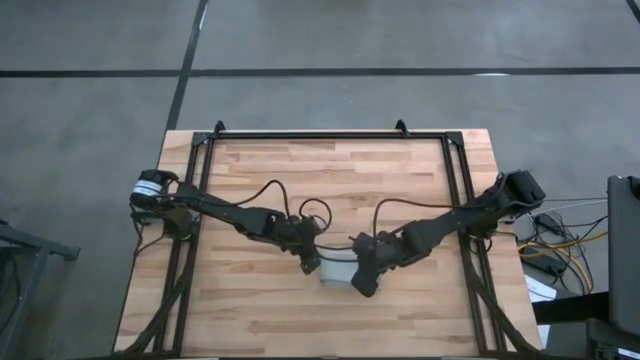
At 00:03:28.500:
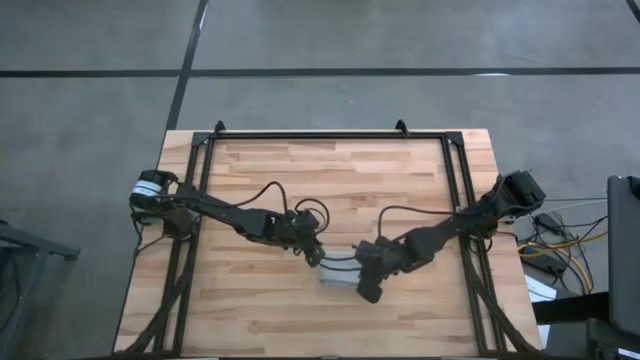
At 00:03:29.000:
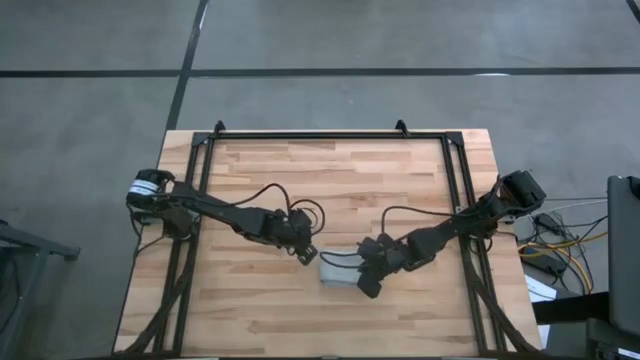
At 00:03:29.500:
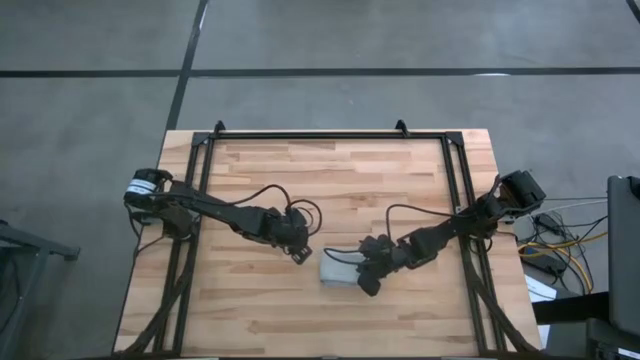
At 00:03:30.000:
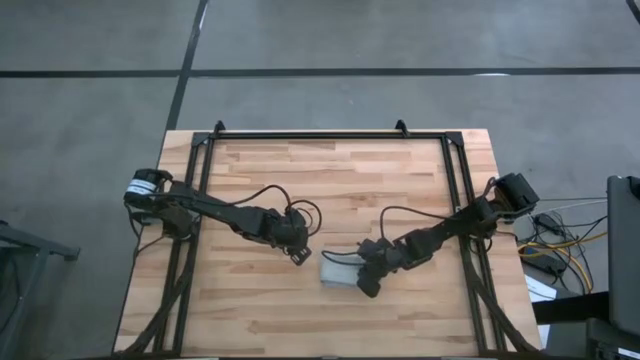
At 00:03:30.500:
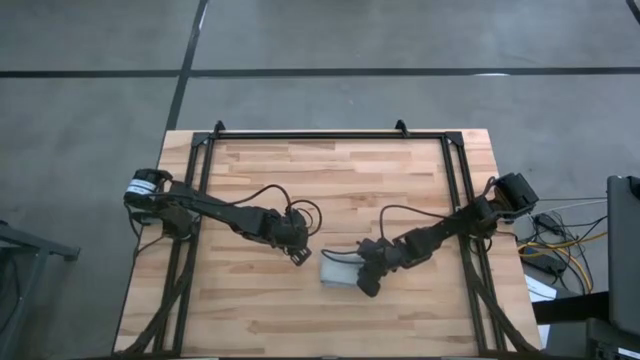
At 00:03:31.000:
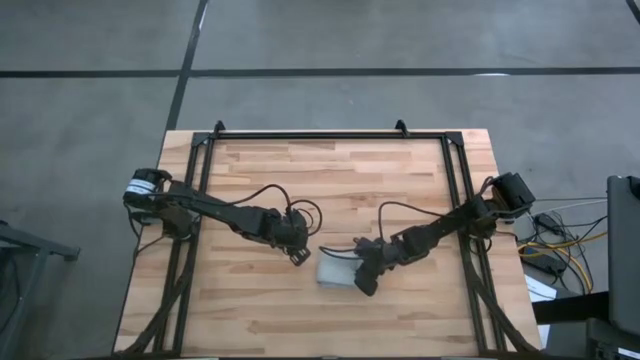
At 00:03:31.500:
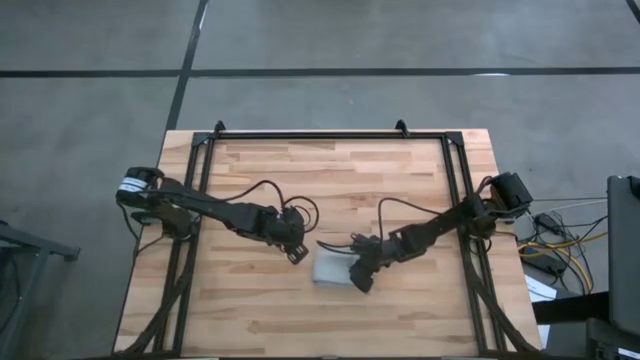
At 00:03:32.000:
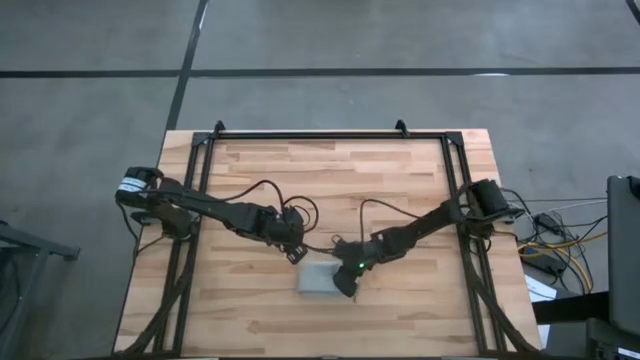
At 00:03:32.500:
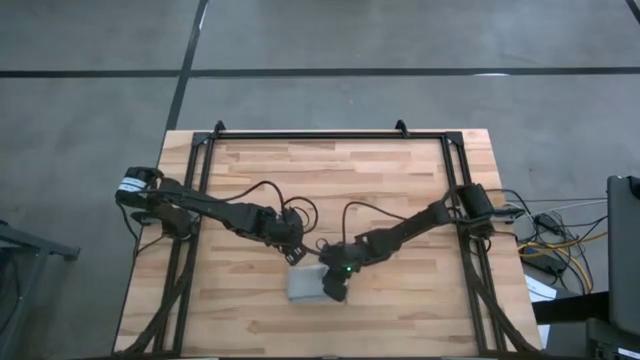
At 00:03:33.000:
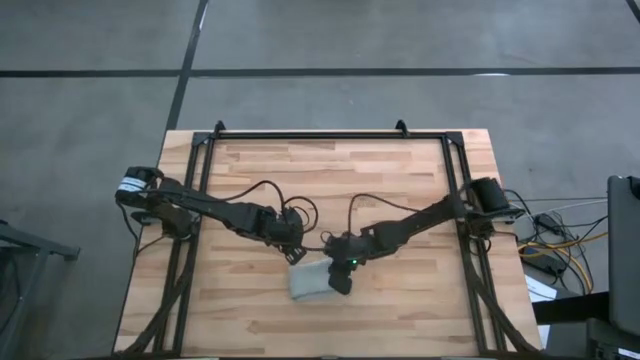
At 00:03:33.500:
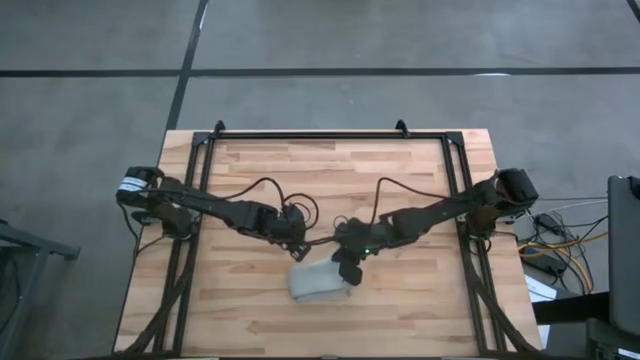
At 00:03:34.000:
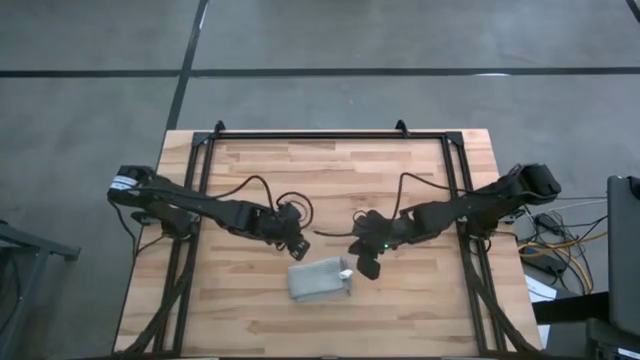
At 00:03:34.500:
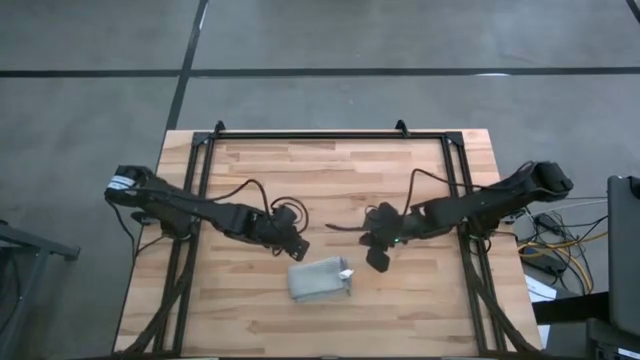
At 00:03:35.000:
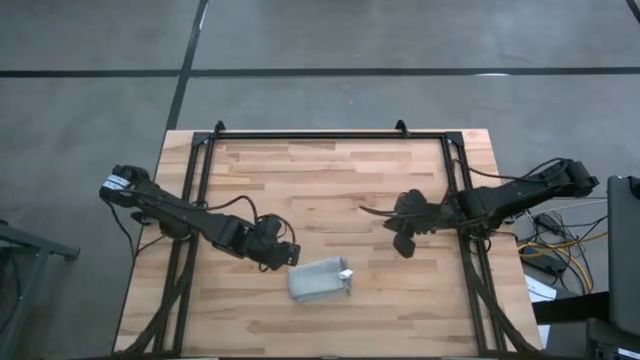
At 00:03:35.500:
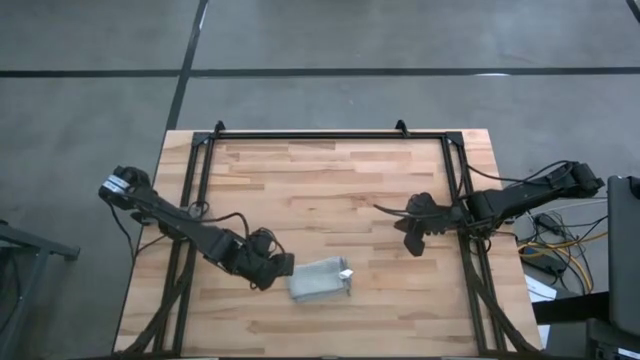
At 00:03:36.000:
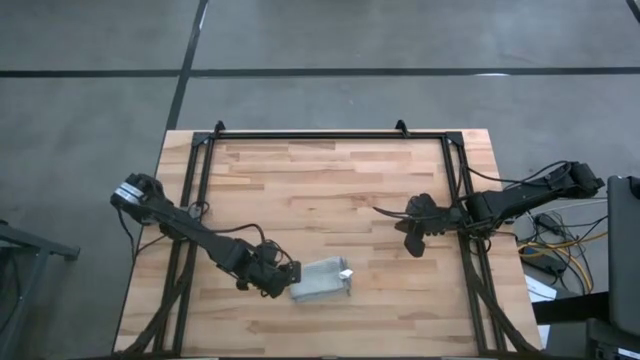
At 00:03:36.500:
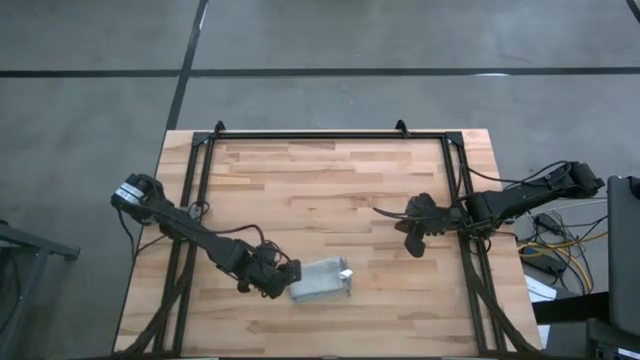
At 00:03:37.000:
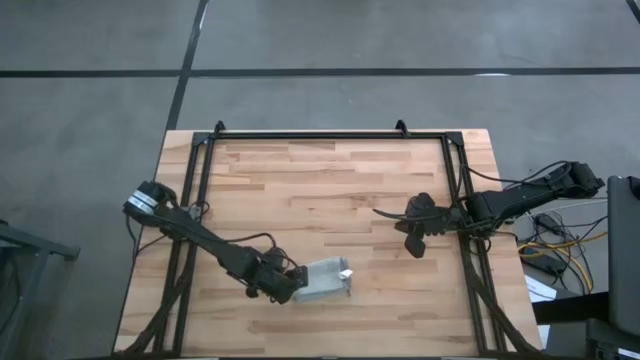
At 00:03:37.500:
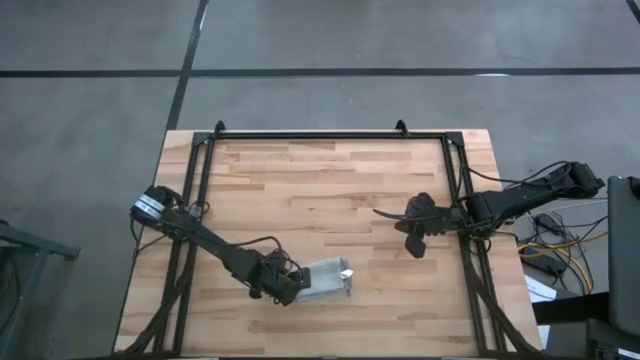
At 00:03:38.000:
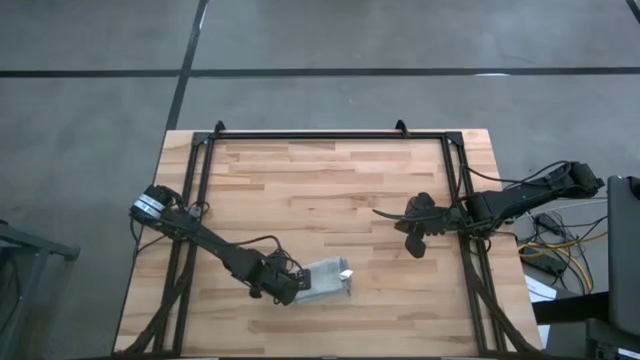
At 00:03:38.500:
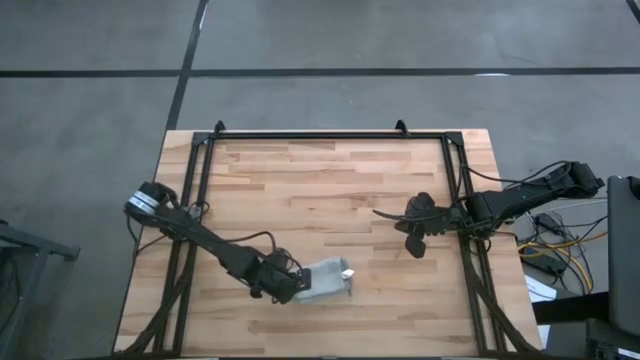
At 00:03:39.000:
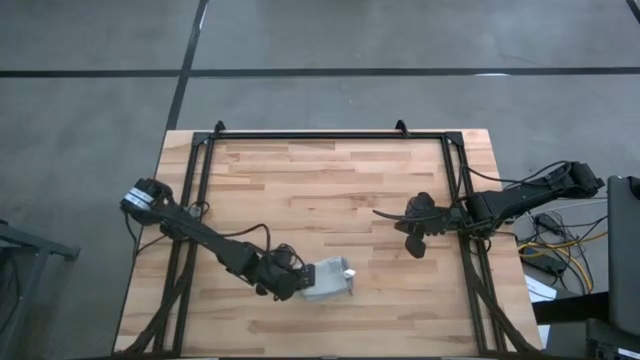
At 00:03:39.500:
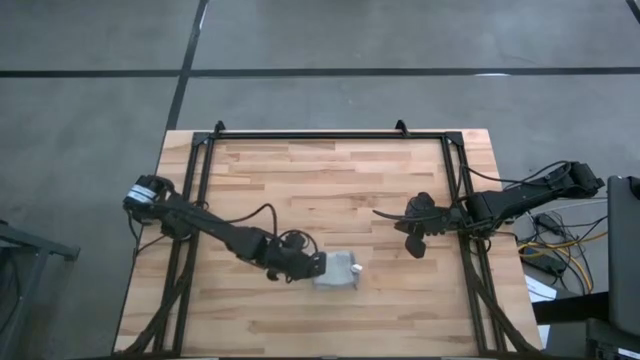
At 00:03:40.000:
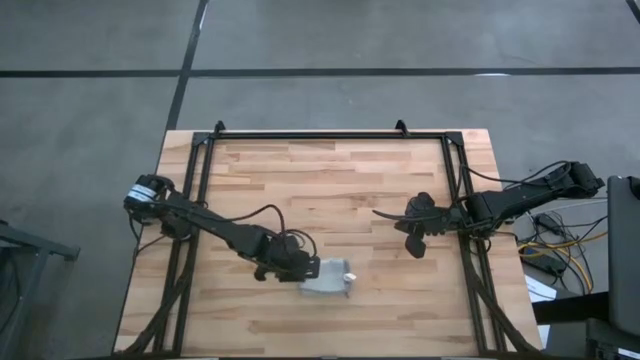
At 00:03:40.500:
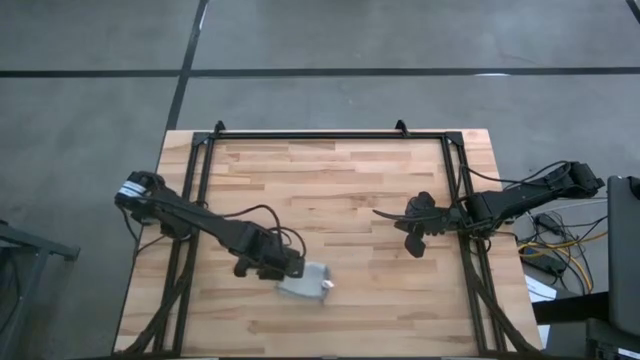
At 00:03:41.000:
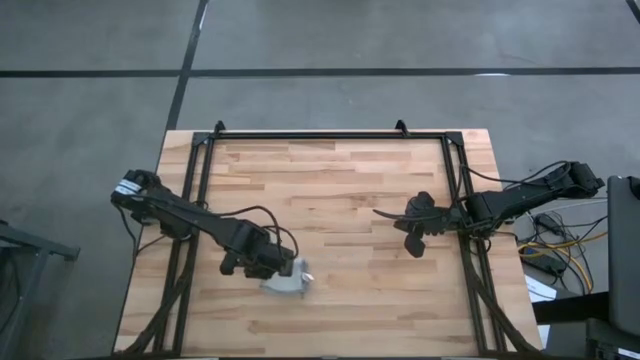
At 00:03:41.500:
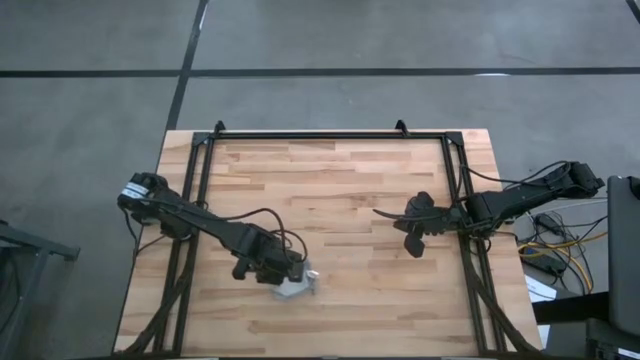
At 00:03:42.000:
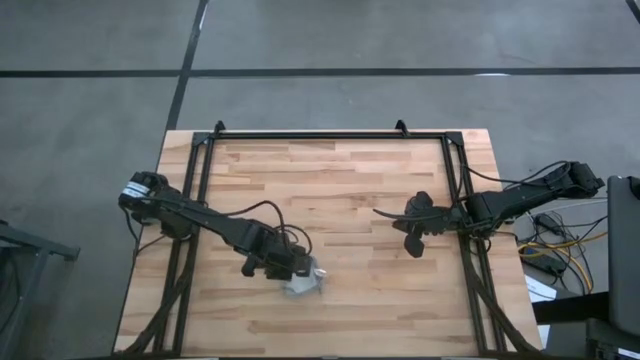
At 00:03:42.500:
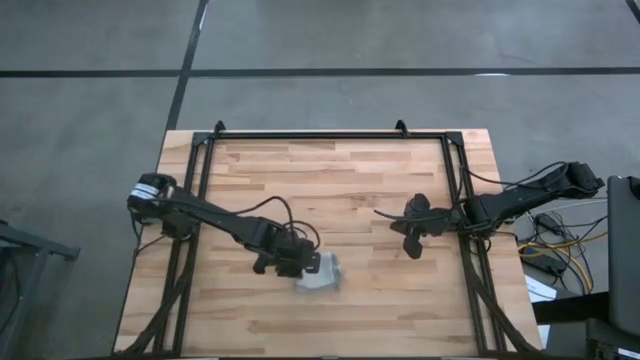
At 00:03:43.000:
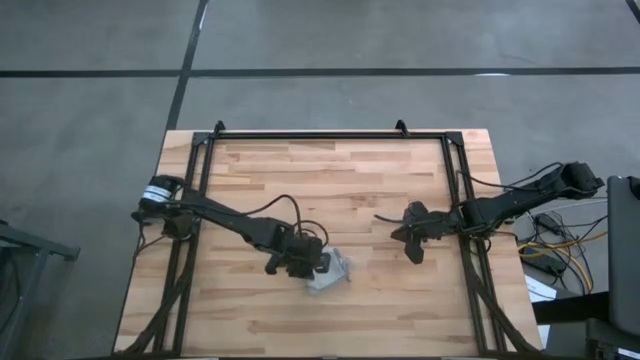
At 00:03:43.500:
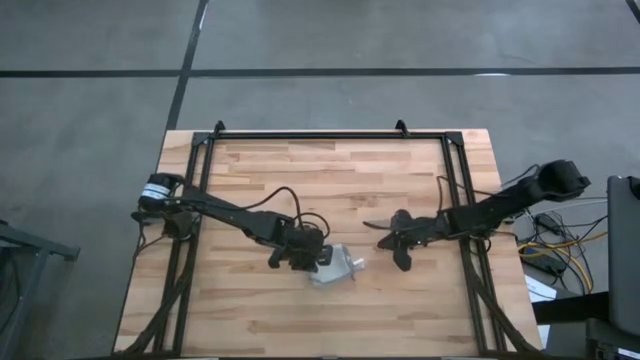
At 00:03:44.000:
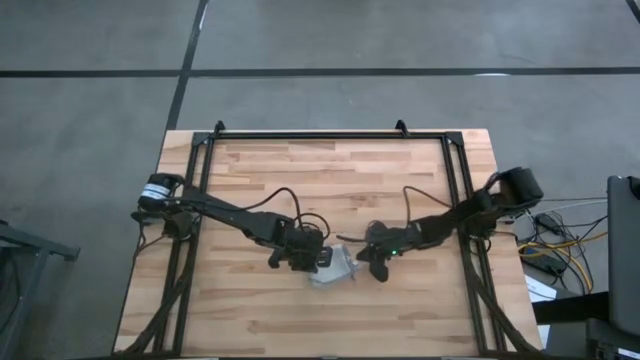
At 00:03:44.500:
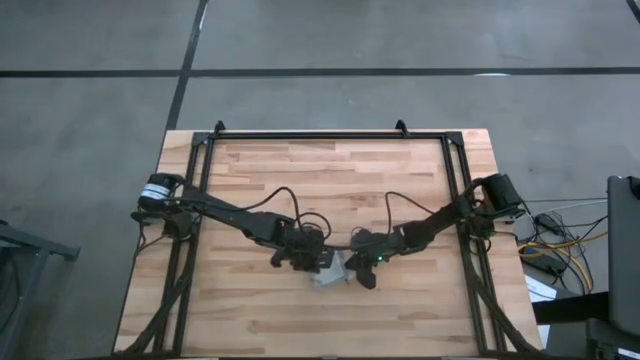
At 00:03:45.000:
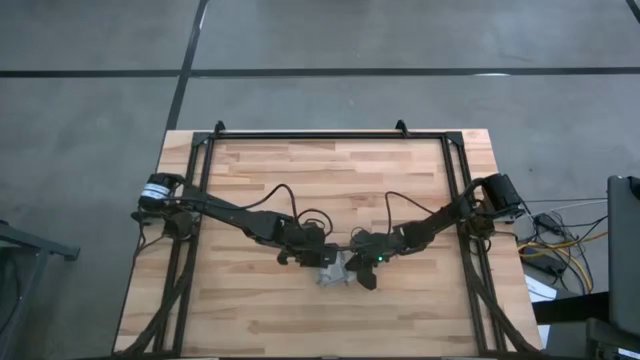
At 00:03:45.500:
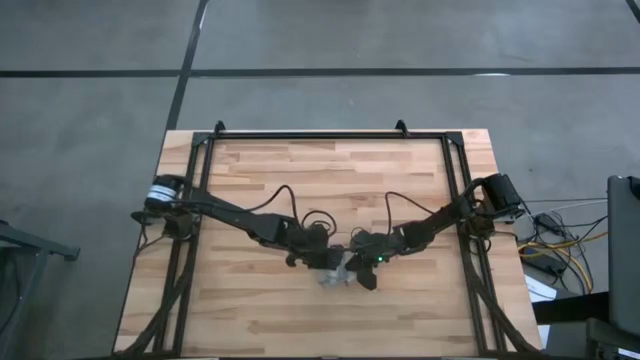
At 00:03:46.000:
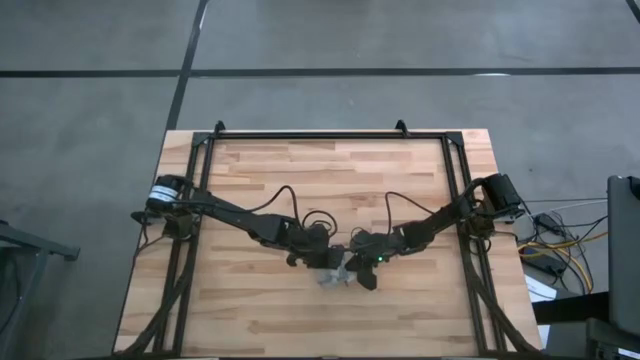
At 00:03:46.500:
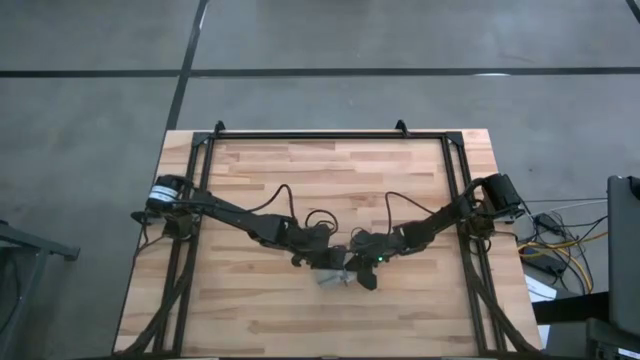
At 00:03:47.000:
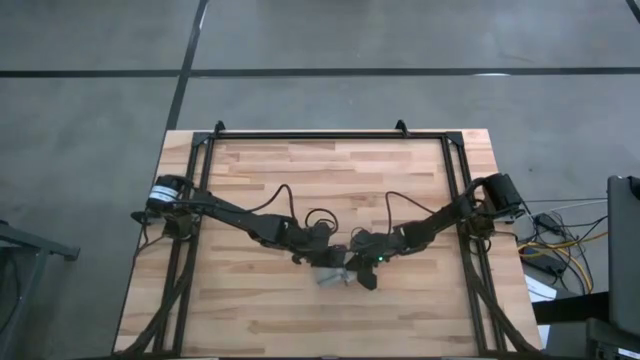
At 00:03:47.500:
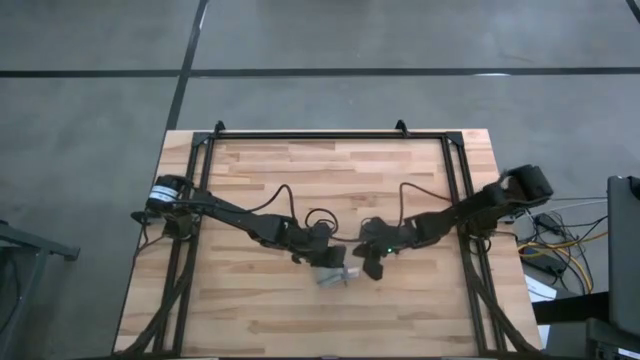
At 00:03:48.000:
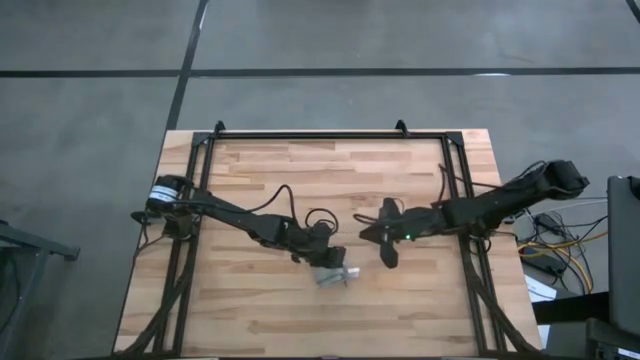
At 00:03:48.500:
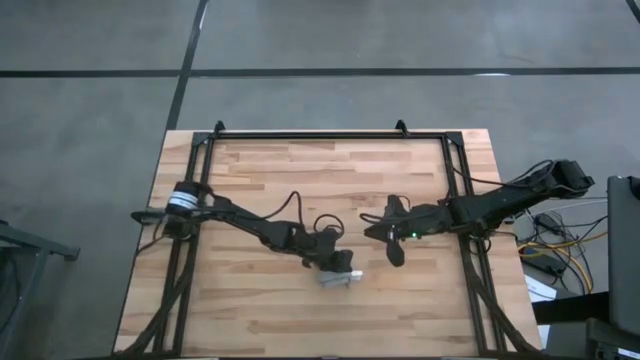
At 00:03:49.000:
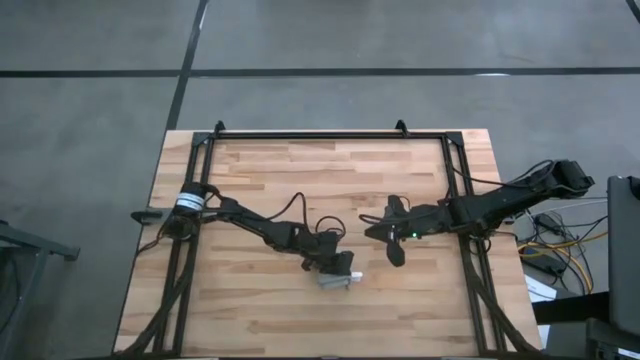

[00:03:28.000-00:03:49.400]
Task: Fold microfiber towels
Fold the microfiber cloth on the table
